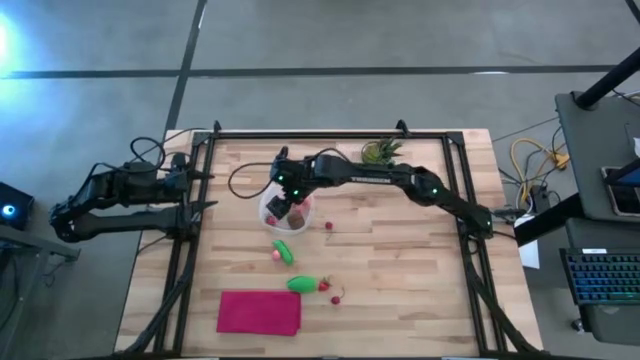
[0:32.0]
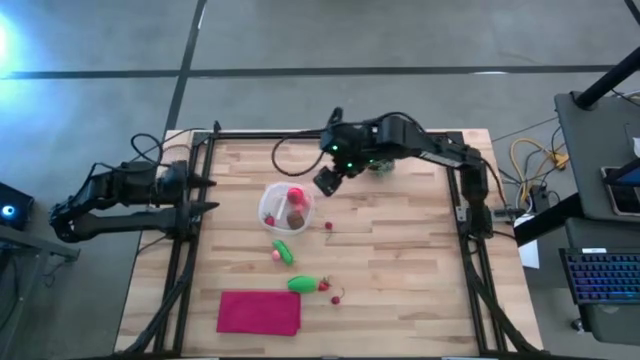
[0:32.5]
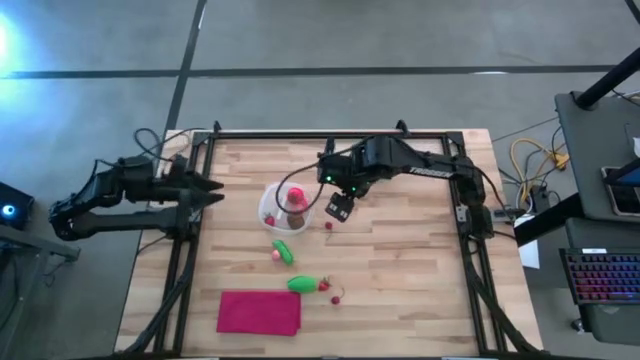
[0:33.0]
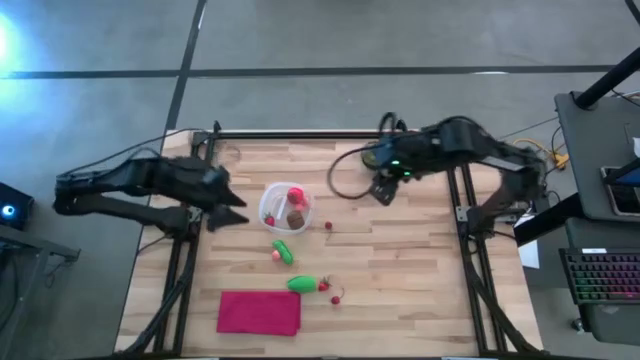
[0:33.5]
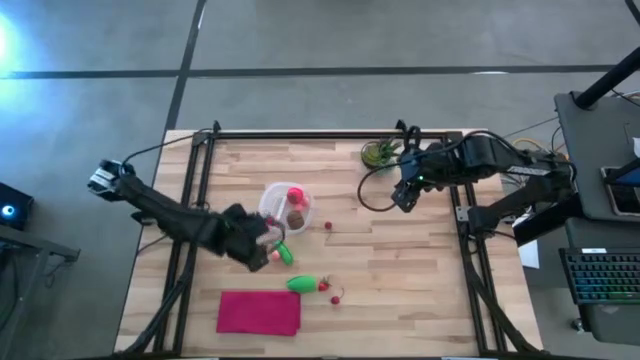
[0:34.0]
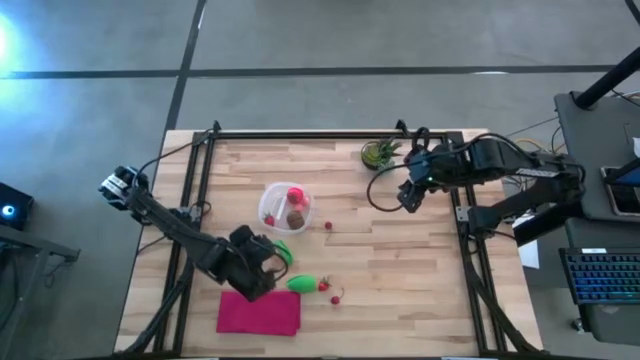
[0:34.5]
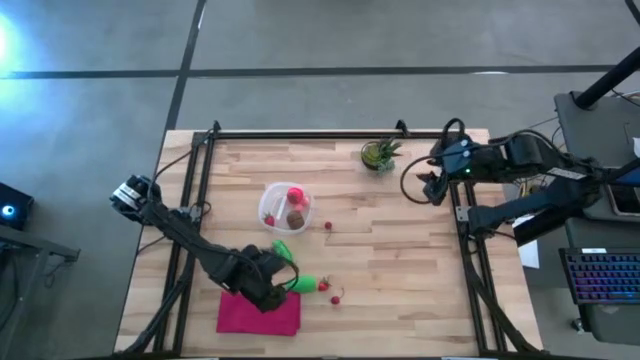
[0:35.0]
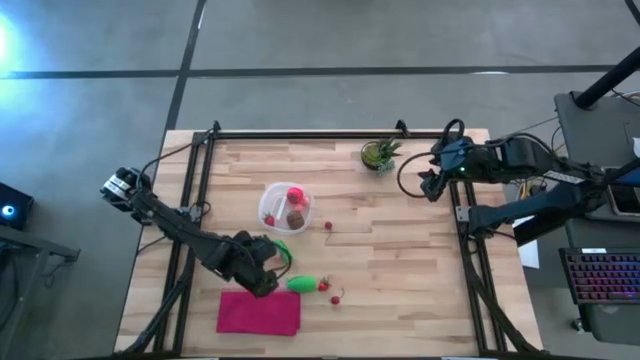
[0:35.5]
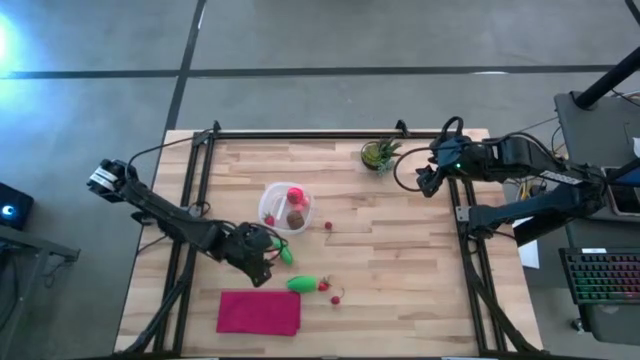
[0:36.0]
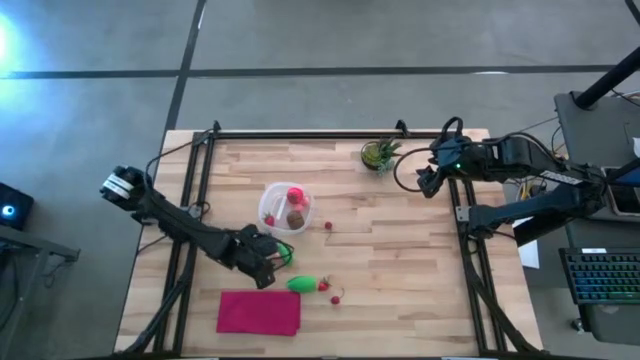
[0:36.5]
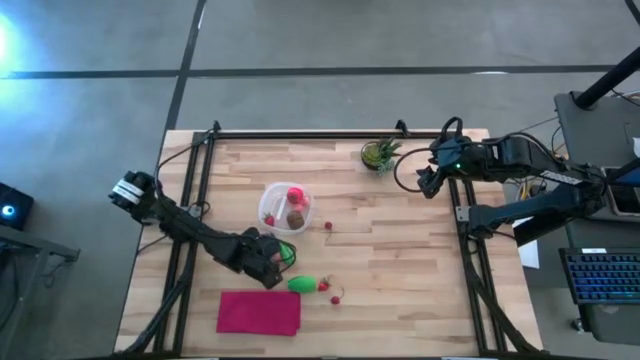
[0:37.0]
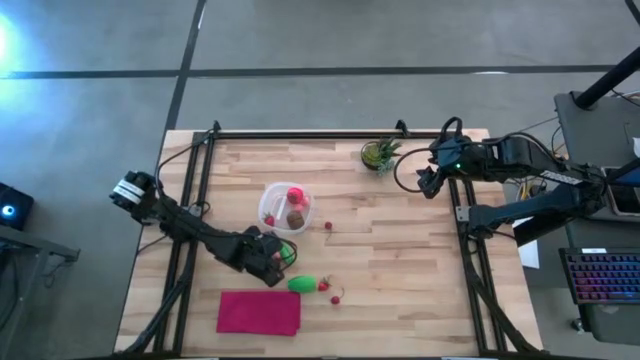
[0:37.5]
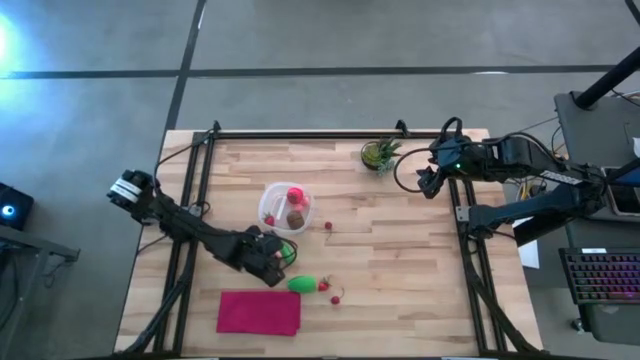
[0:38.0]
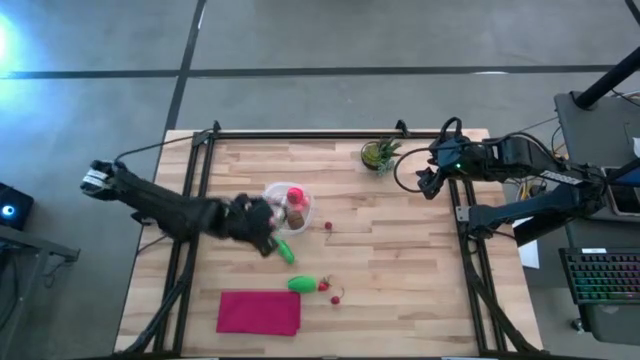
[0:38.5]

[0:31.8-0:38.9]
Task: Pick and placing Produce into tupperware
Put the pink peach into the transparent bin

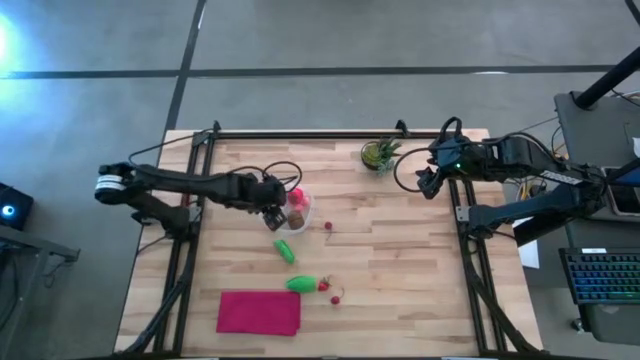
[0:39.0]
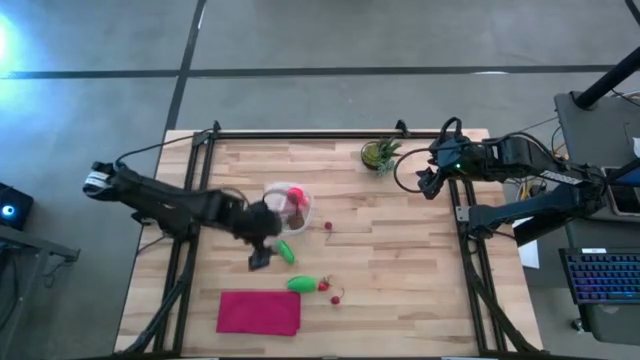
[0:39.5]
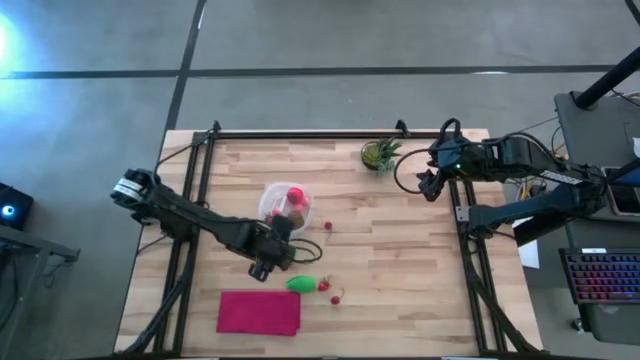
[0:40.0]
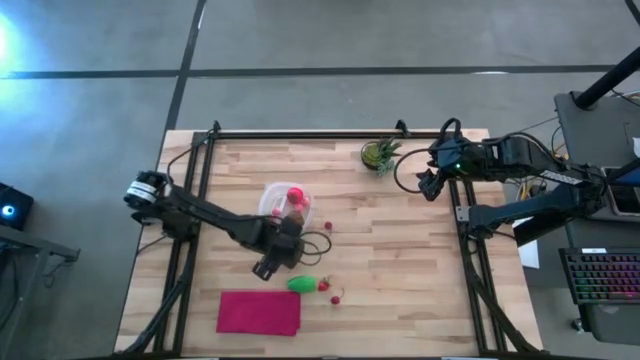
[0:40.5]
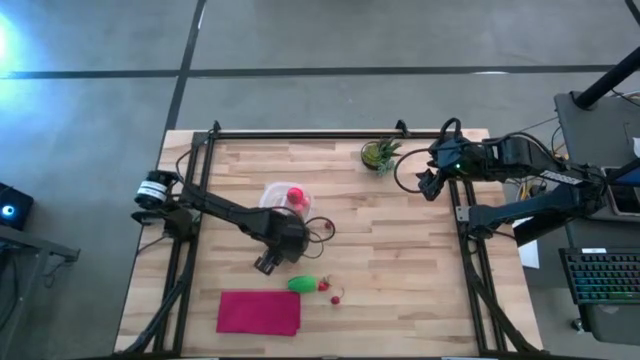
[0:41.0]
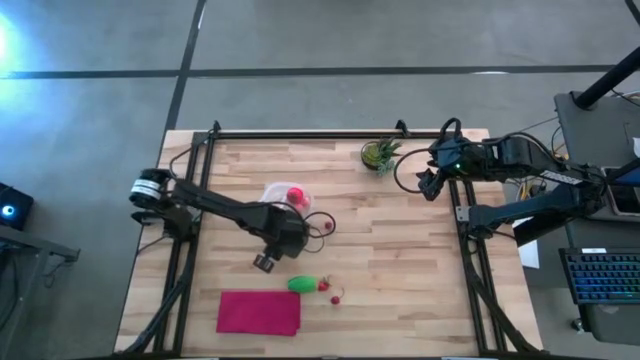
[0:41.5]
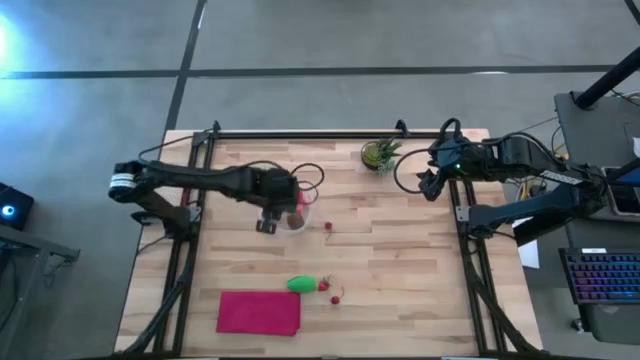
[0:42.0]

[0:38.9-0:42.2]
Put the green pea into the transparent bin

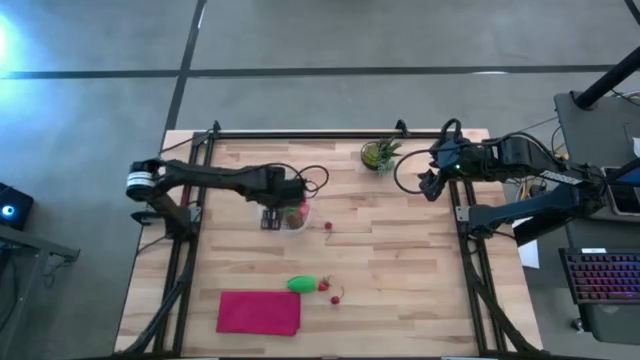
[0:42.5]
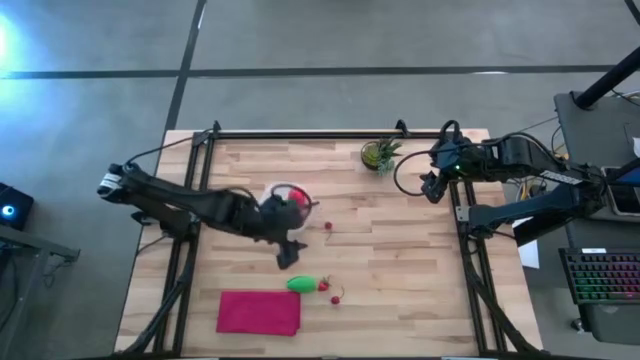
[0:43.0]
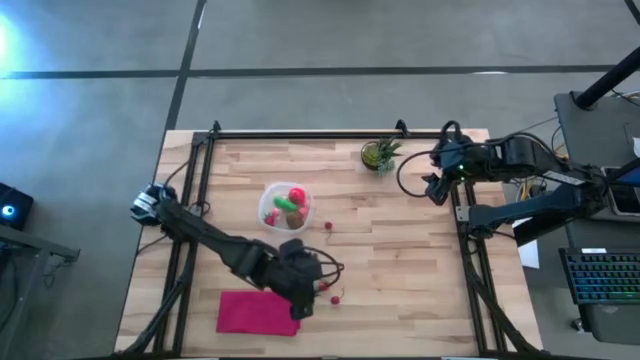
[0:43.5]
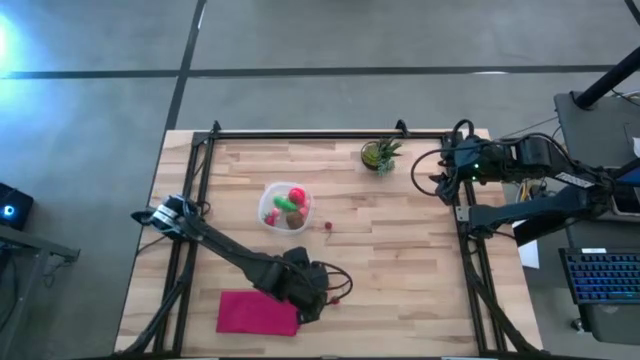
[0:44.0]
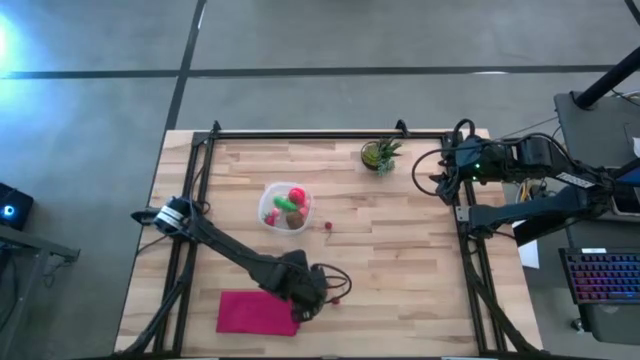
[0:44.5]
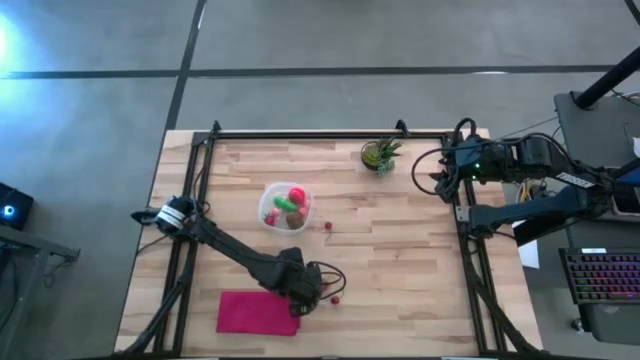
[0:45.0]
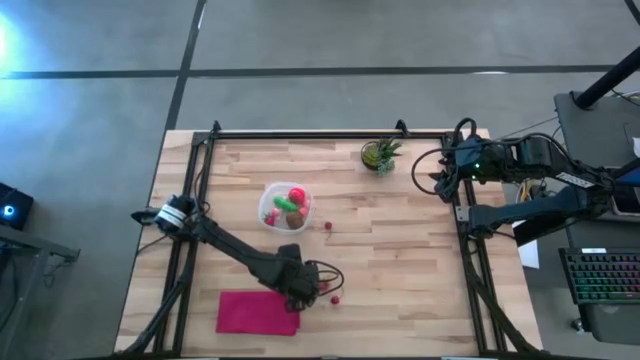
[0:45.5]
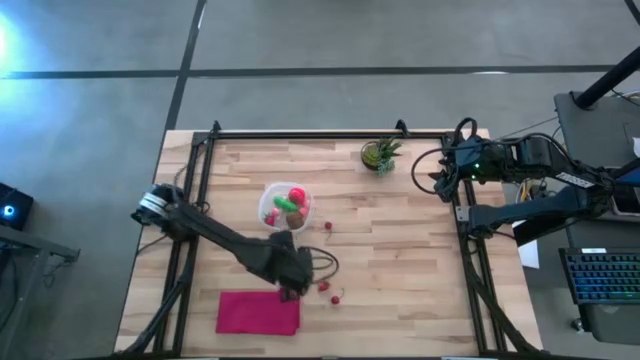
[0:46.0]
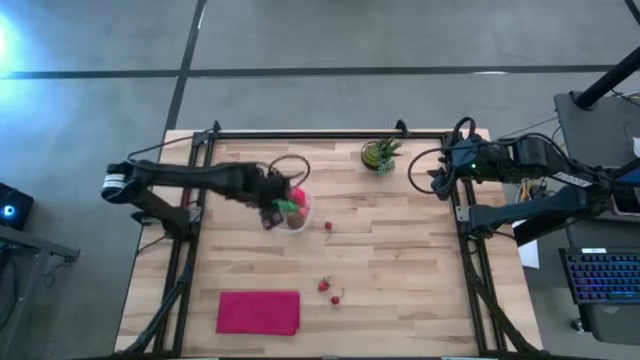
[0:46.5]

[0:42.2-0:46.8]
Put the green corn into the transparent bin

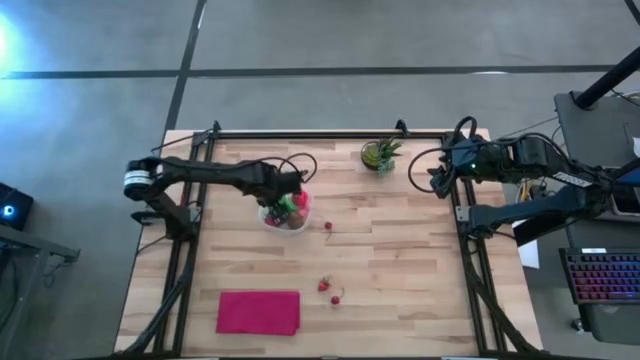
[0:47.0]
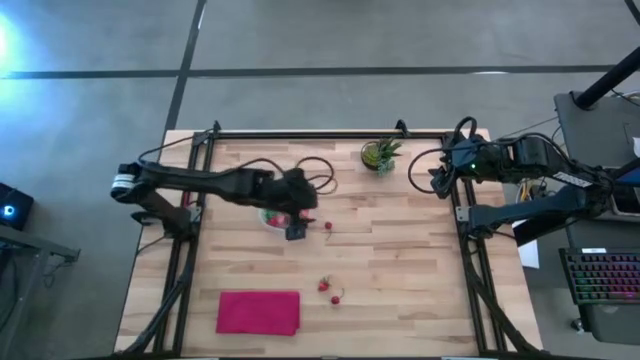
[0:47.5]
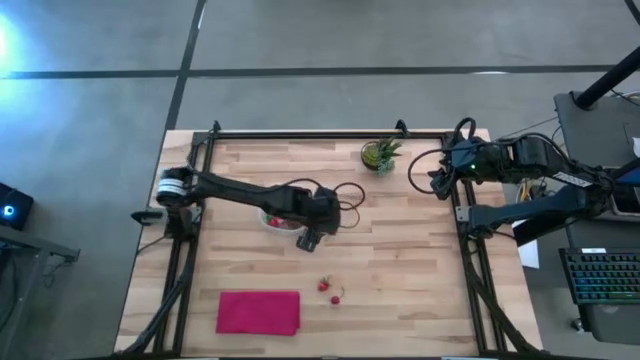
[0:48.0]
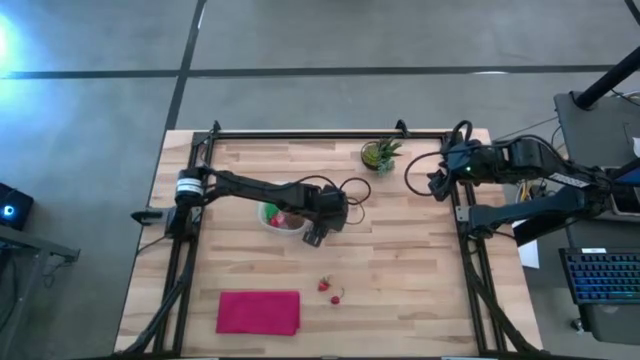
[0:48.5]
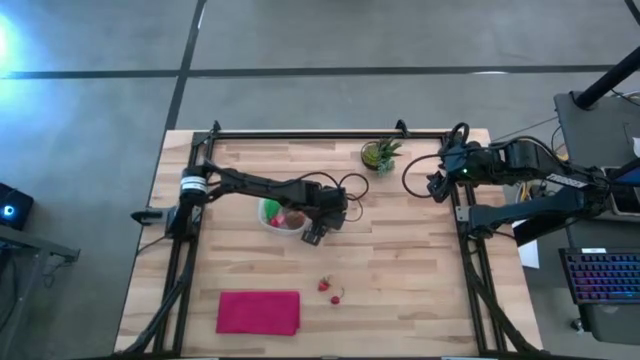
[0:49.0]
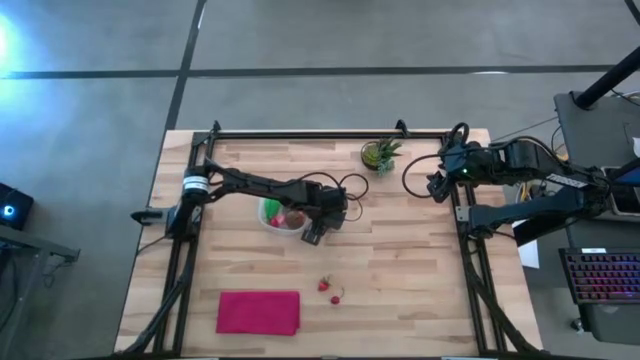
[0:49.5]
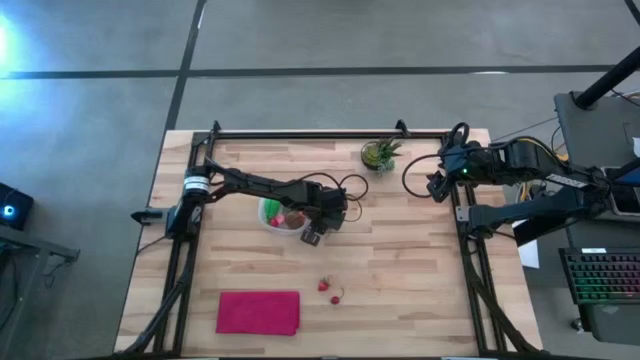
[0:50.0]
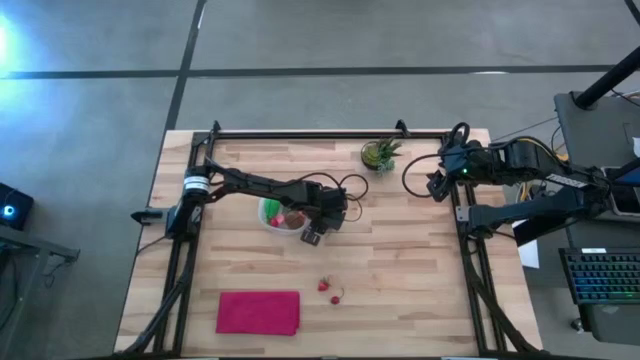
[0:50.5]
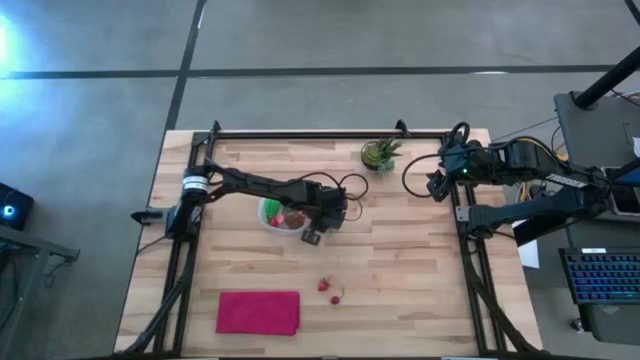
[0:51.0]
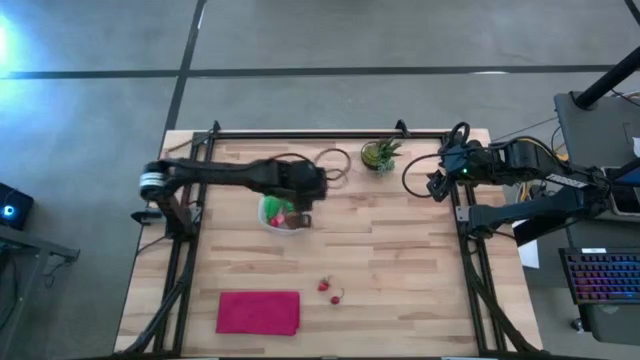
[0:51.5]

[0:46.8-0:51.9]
Put the top red cherry into the transparent bin

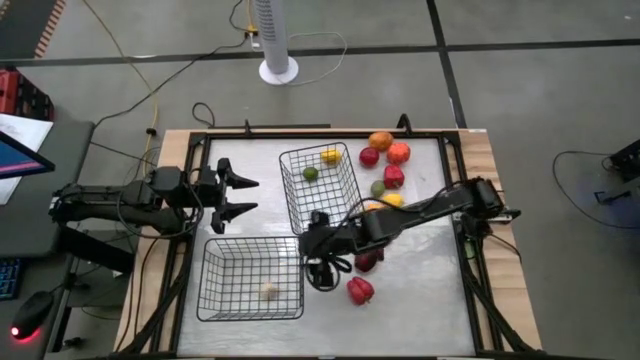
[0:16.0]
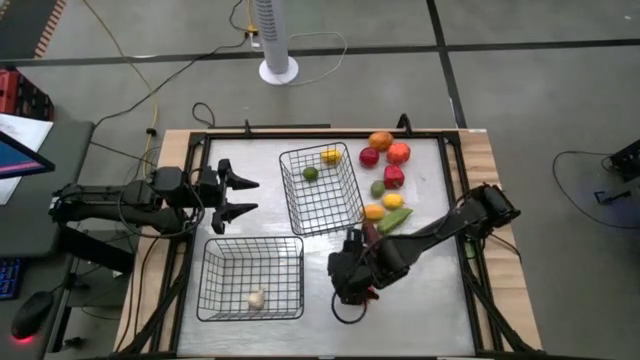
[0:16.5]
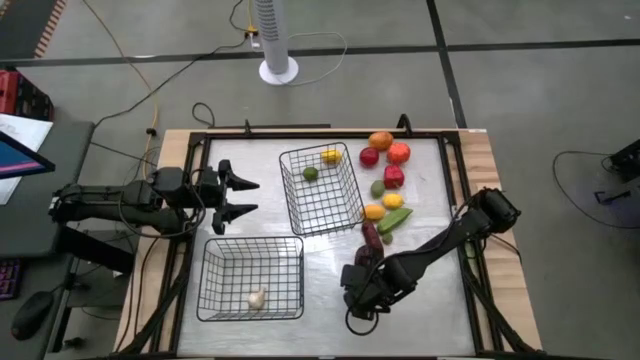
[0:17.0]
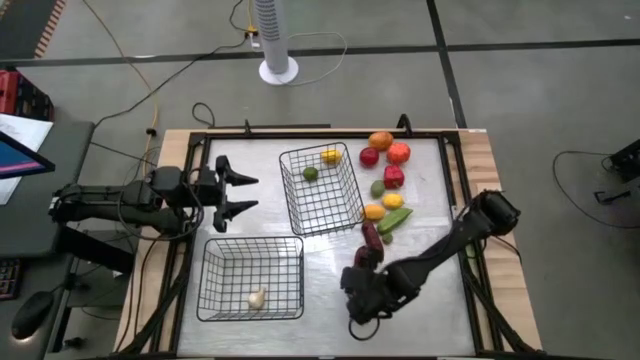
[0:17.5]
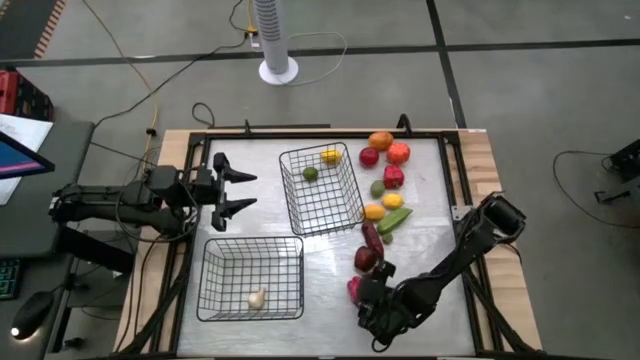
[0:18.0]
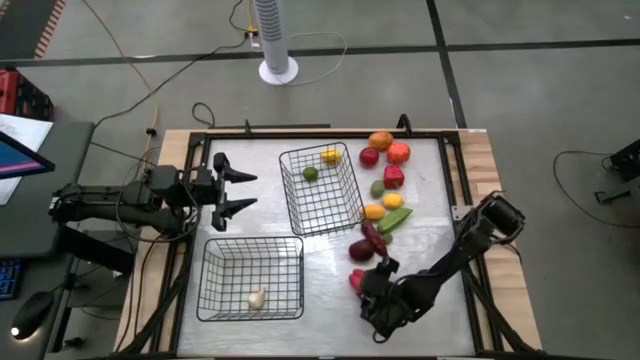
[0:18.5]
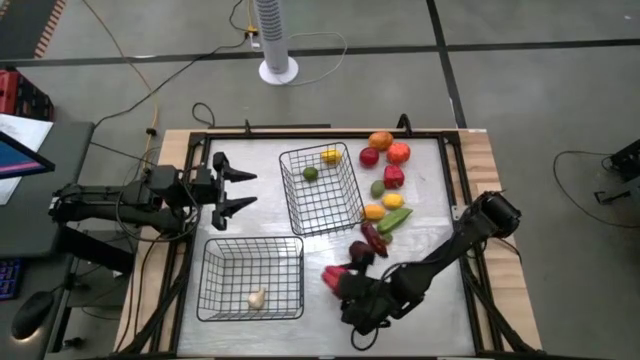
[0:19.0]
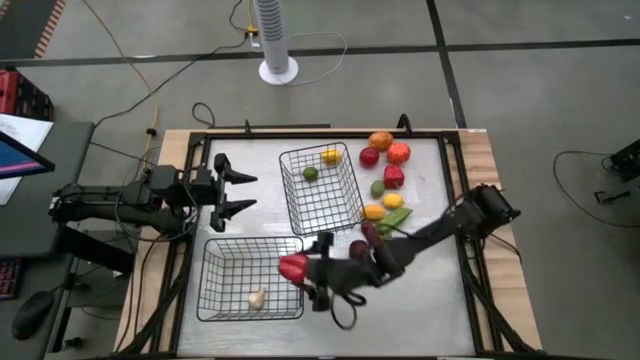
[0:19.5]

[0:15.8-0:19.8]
Task: Sort produce into baskets
Put the bottom red bell pepper into the bottom black wire basket
